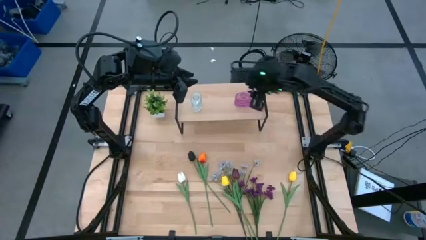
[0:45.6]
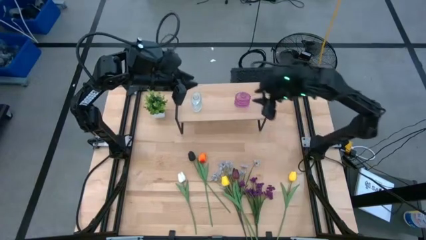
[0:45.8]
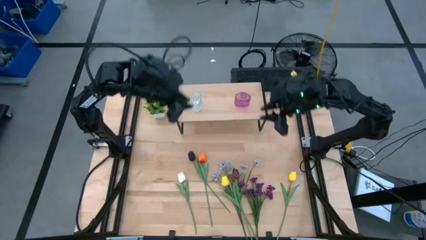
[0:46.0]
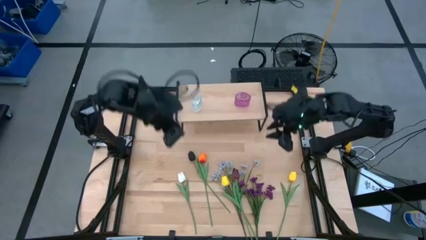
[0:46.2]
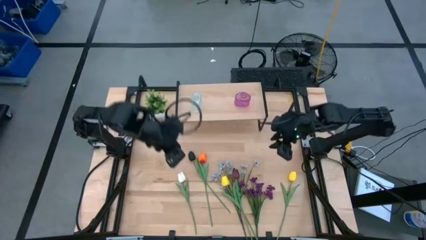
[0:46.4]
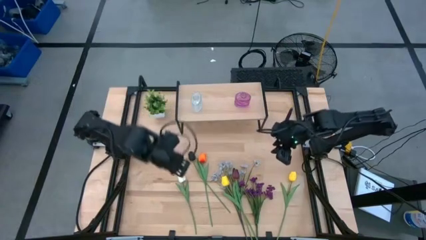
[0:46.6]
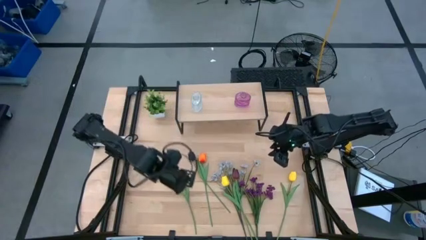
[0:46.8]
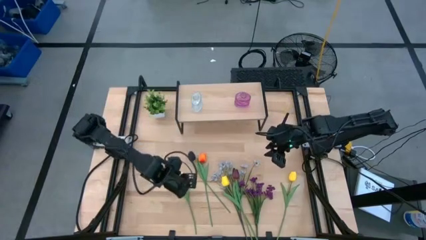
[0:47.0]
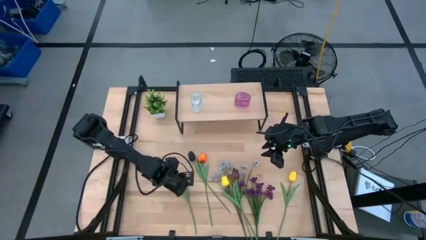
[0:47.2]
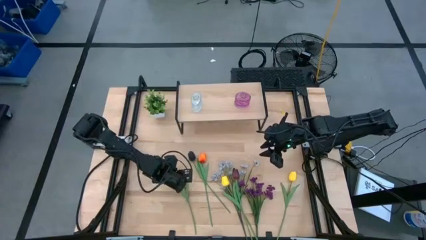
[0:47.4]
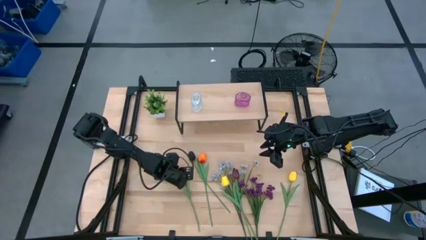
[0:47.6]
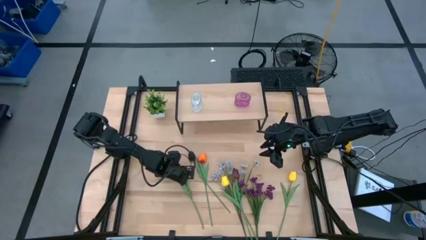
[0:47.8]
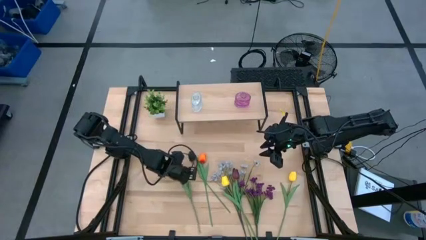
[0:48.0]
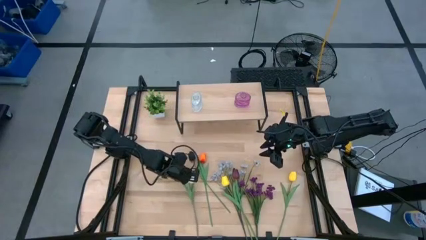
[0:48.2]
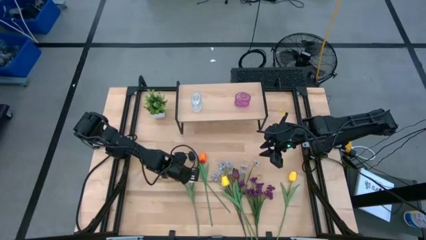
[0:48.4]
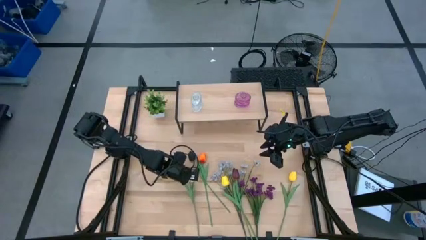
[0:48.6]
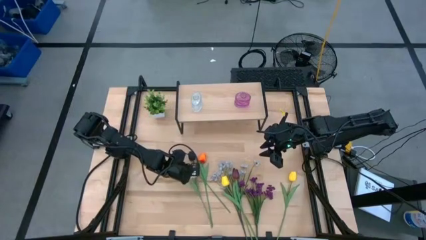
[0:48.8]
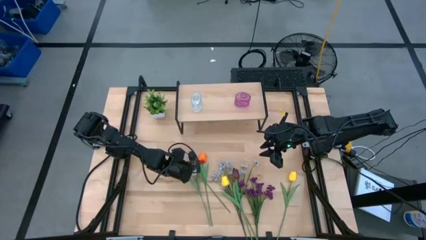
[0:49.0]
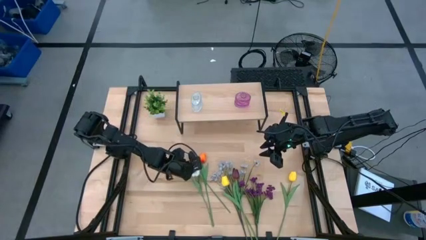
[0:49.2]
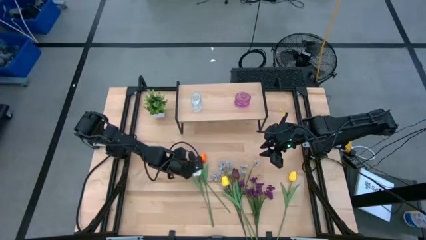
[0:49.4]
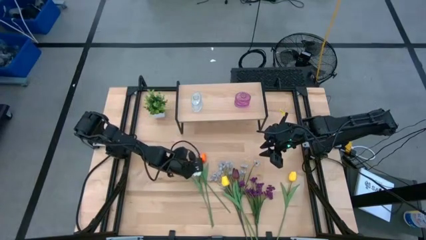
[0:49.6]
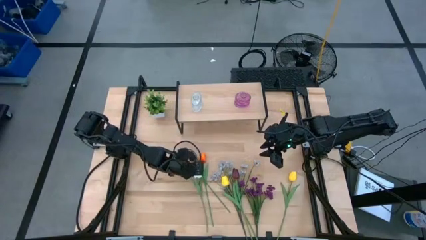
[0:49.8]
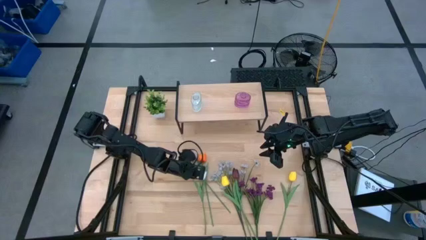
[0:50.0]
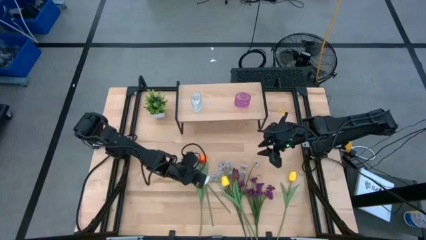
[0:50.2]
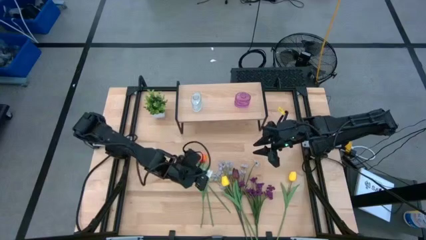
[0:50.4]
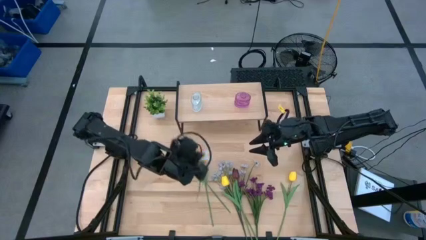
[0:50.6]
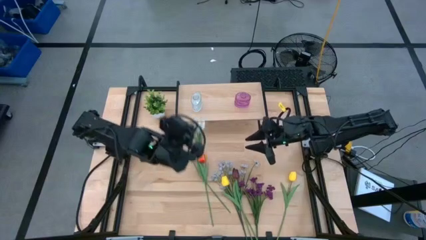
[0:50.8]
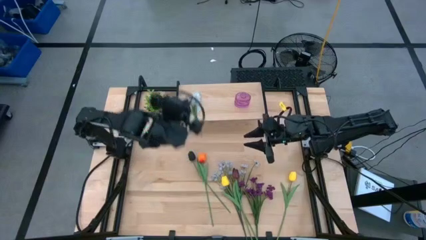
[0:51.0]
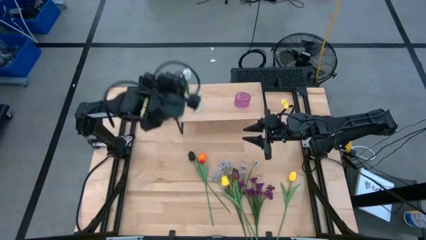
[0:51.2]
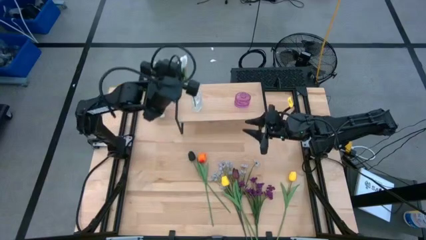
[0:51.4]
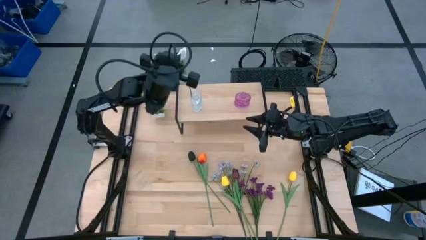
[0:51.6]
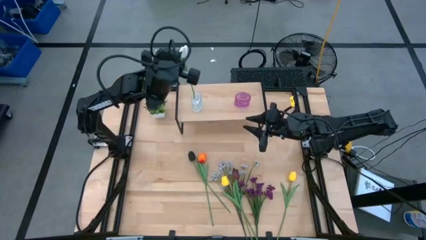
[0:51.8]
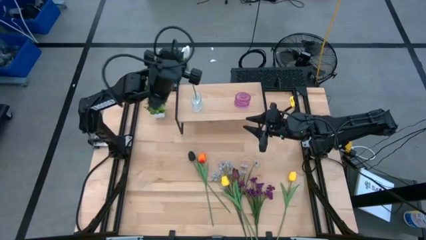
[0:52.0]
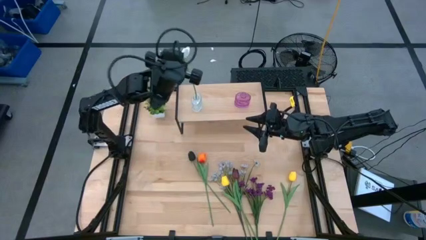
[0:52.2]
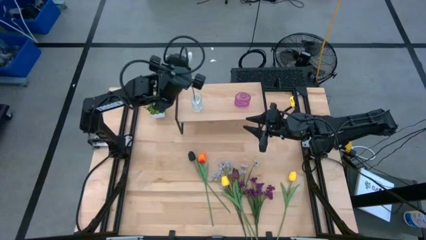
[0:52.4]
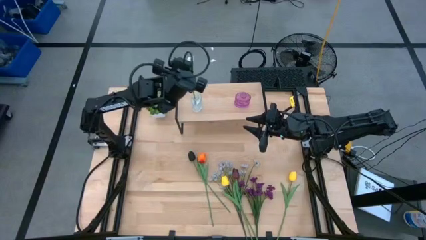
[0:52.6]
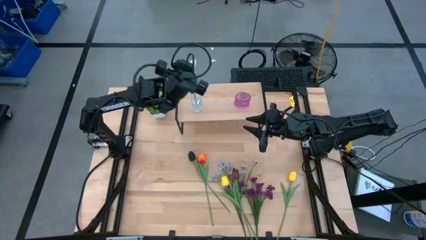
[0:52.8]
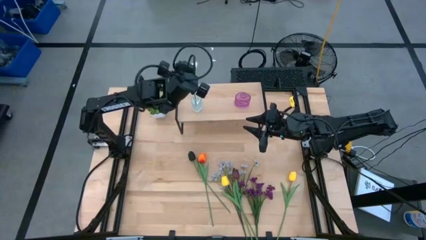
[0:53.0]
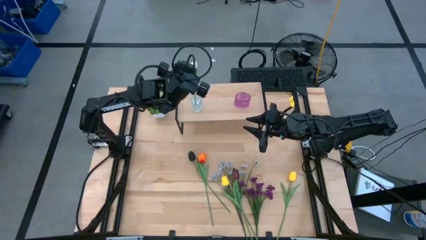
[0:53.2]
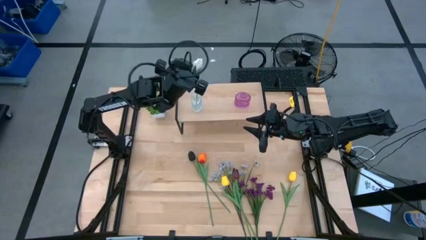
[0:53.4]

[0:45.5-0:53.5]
Task: Pick and place flowers into a vace then onto a shelf
Put the white tulip into the white vase

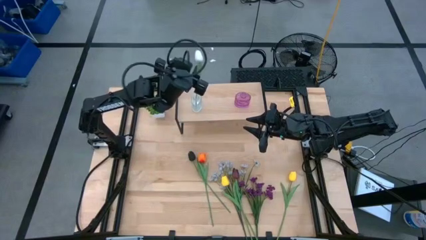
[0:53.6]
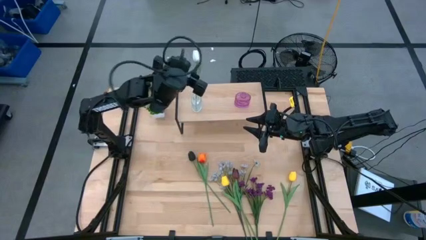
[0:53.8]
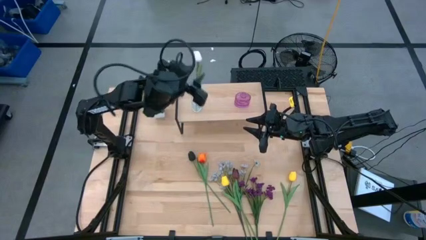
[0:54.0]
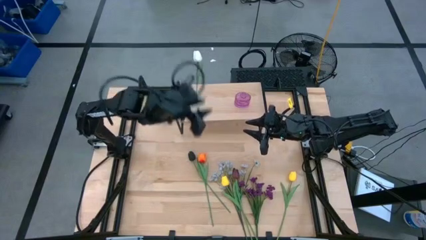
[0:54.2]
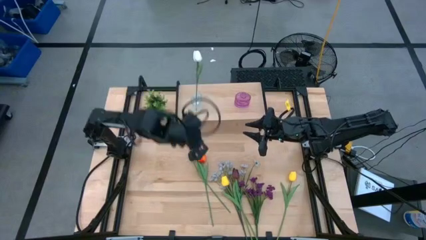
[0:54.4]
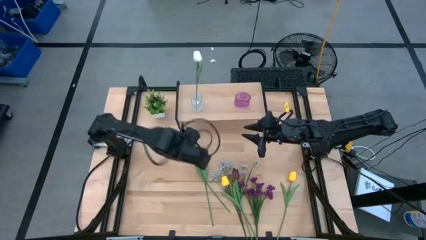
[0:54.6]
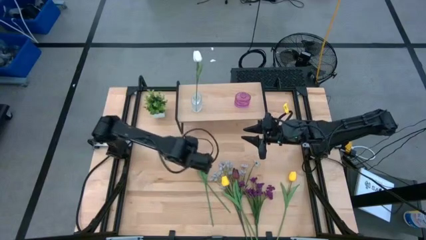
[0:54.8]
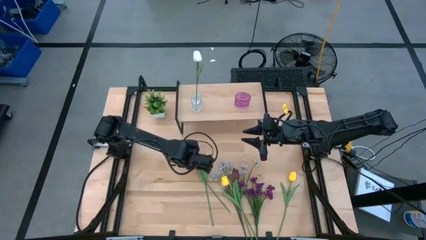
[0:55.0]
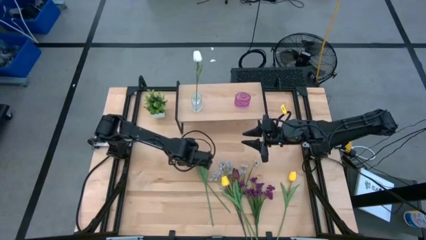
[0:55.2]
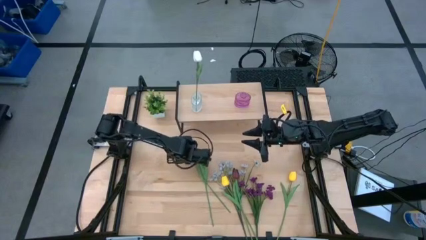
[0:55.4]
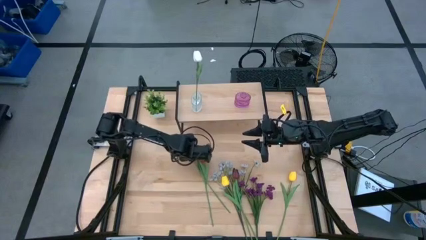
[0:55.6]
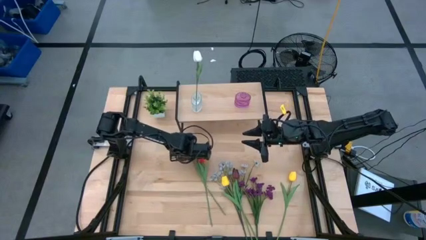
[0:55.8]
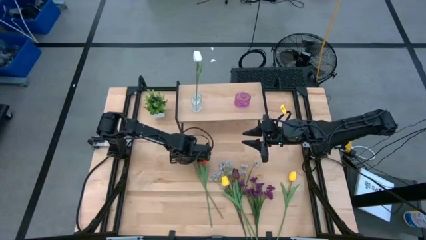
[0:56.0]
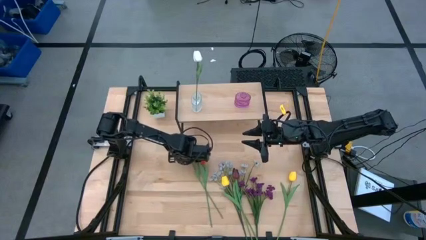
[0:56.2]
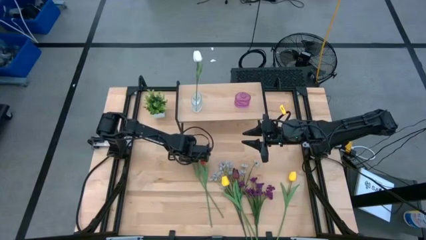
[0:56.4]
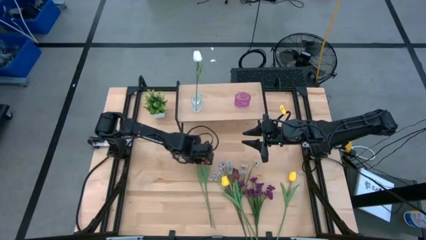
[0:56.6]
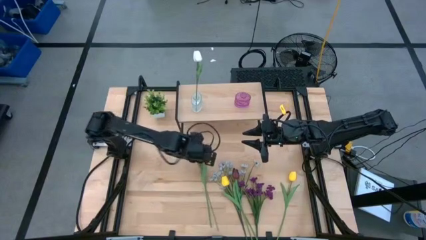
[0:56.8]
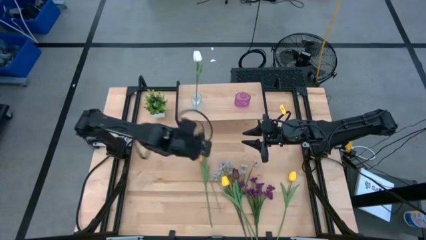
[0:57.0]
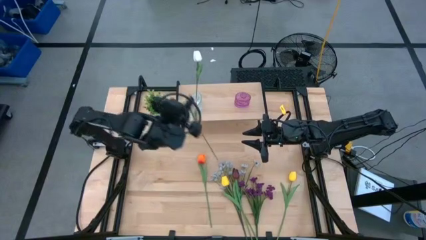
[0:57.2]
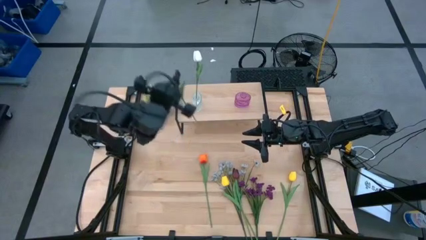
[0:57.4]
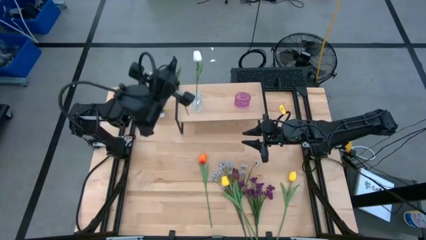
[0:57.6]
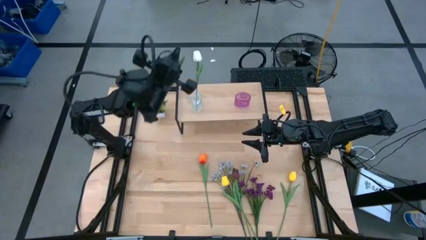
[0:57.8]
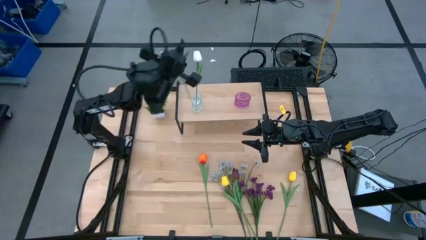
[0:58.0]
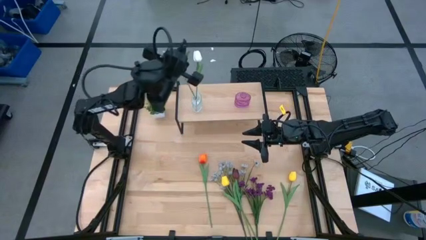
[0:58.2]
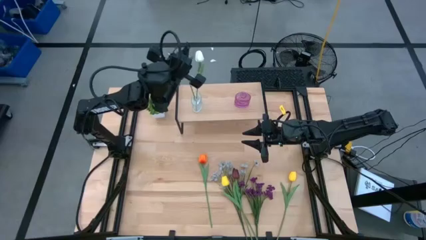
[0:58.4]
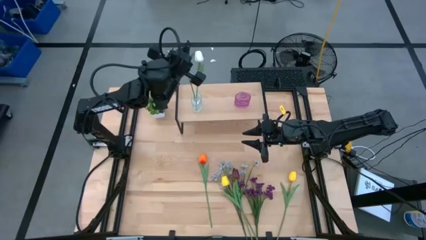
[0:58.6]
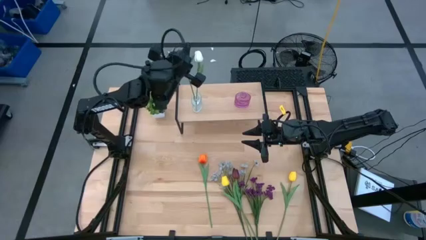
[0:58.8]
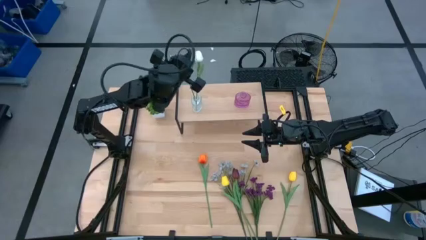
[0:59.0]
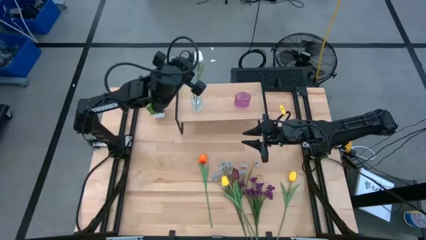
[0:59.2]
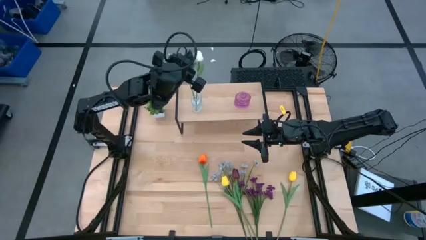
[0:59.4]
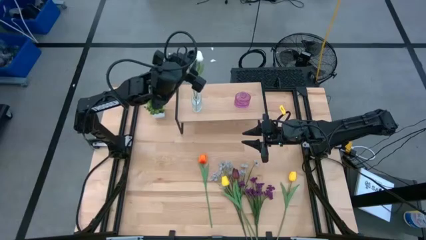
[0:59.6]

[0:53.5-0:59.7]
Put the black tulip into the white vase
